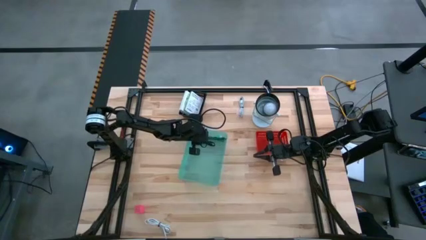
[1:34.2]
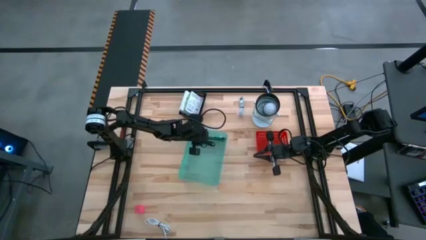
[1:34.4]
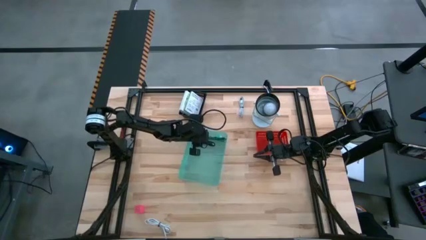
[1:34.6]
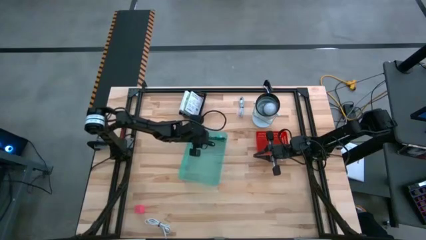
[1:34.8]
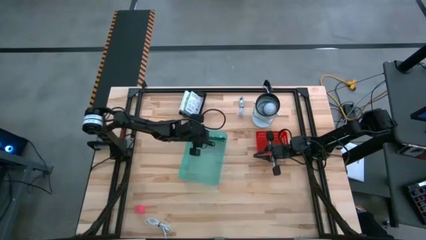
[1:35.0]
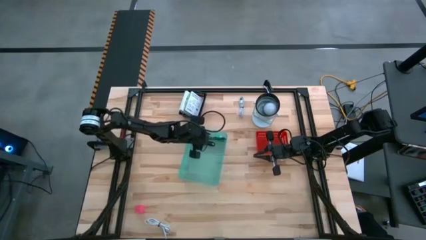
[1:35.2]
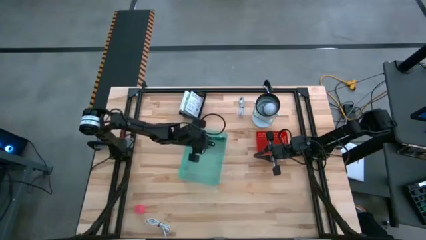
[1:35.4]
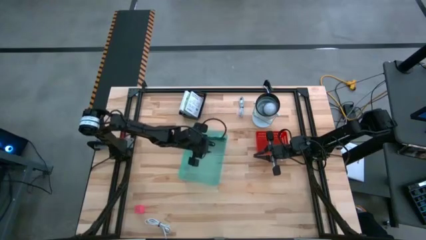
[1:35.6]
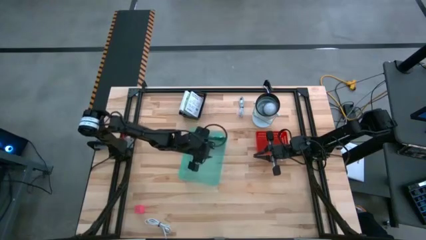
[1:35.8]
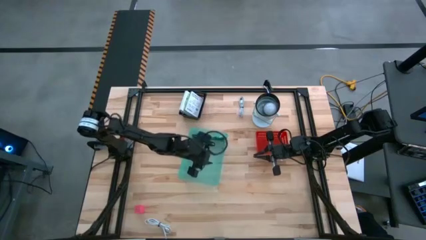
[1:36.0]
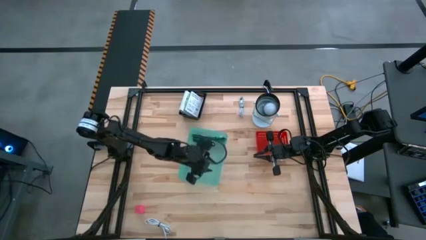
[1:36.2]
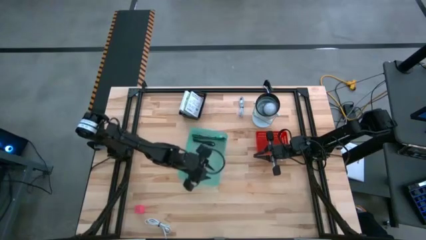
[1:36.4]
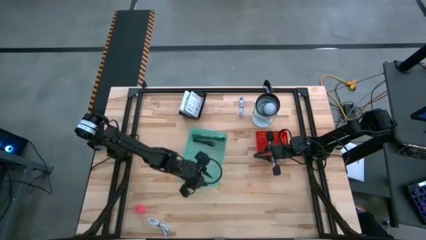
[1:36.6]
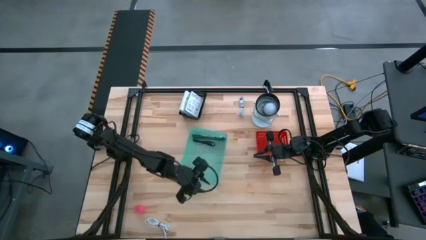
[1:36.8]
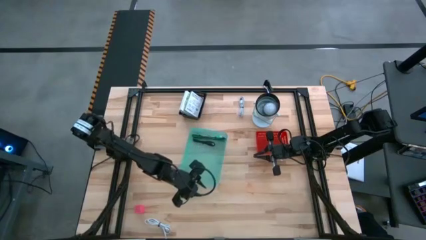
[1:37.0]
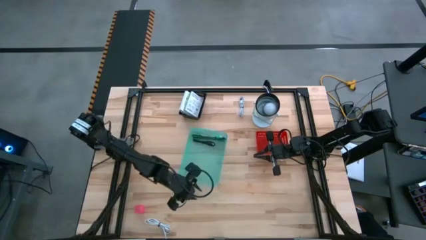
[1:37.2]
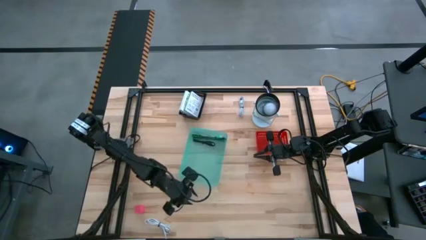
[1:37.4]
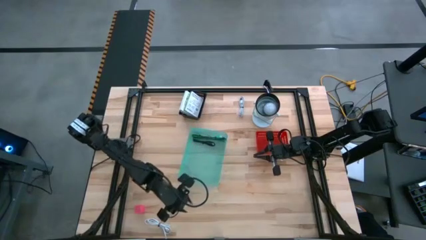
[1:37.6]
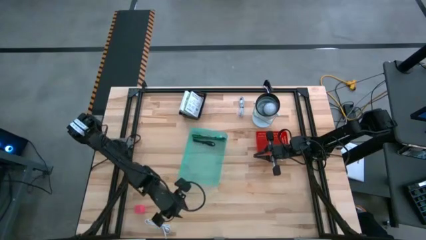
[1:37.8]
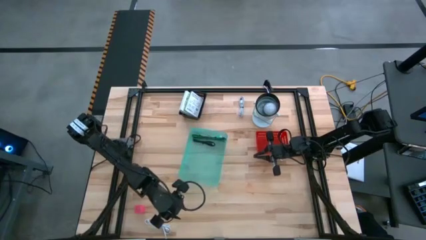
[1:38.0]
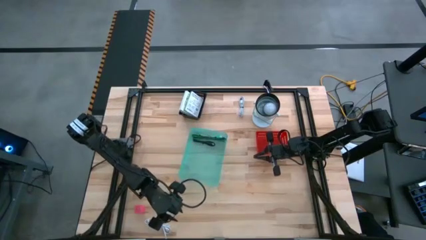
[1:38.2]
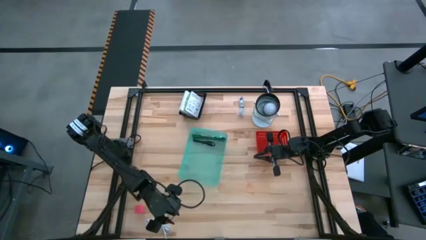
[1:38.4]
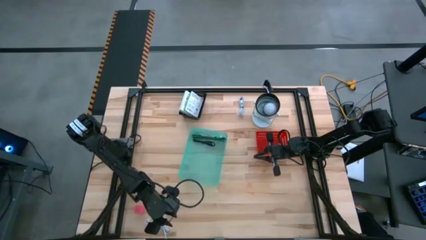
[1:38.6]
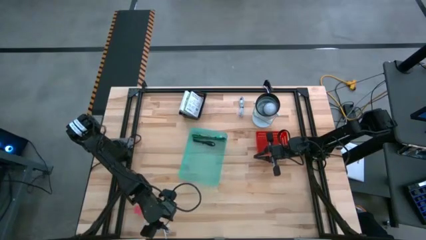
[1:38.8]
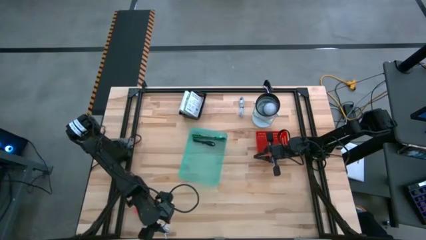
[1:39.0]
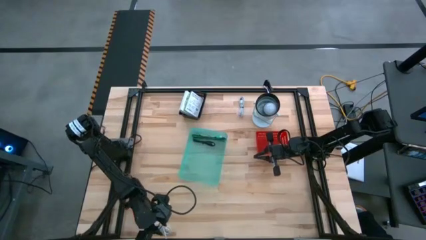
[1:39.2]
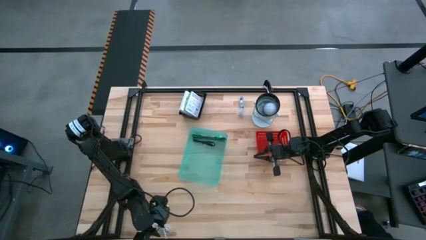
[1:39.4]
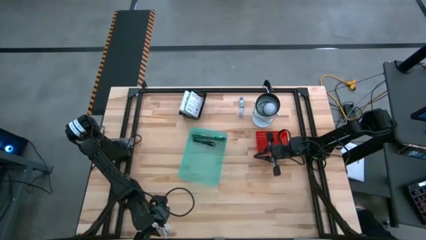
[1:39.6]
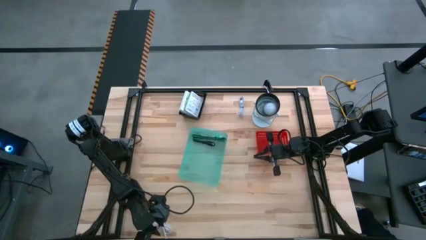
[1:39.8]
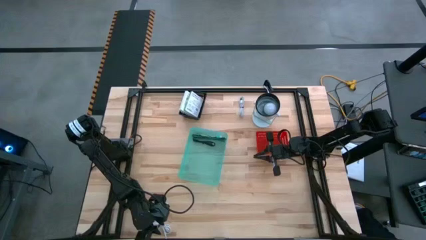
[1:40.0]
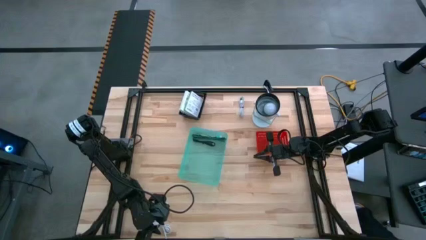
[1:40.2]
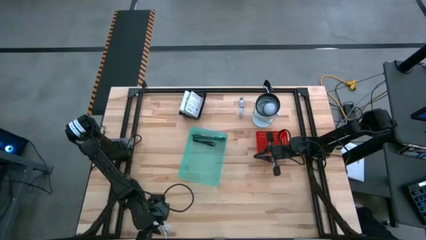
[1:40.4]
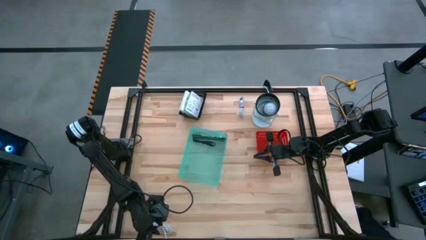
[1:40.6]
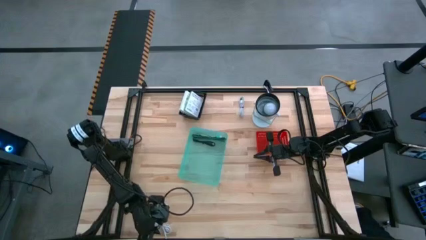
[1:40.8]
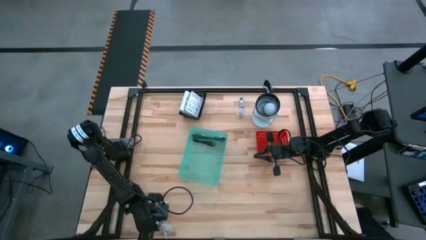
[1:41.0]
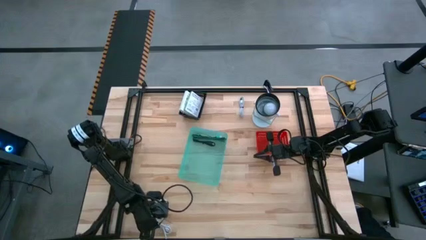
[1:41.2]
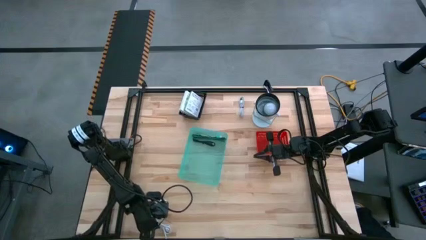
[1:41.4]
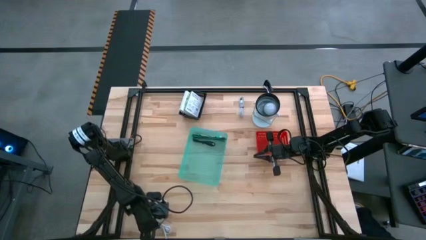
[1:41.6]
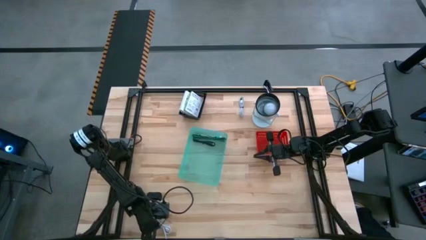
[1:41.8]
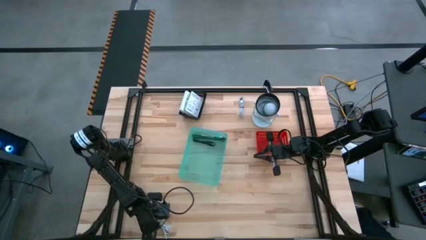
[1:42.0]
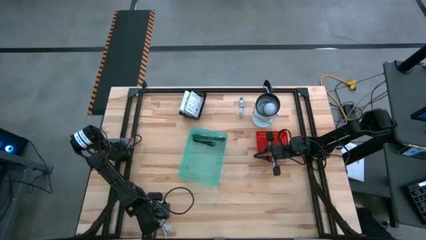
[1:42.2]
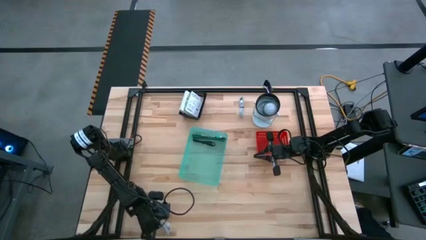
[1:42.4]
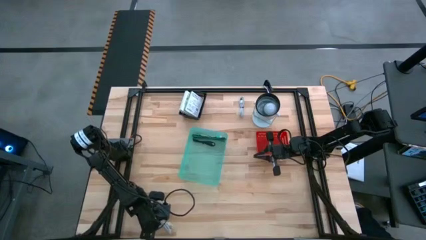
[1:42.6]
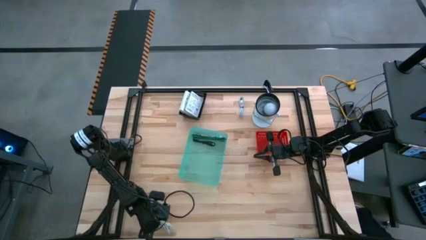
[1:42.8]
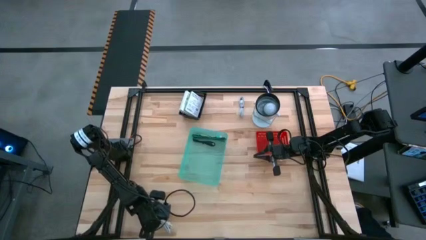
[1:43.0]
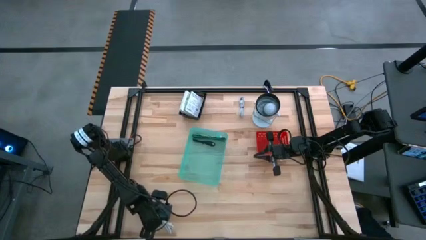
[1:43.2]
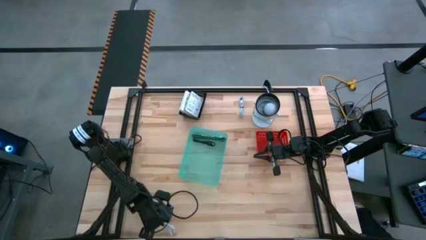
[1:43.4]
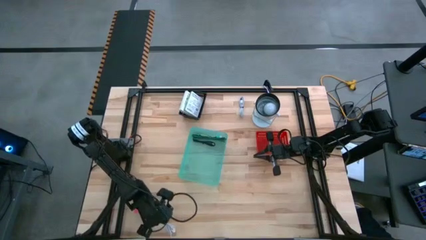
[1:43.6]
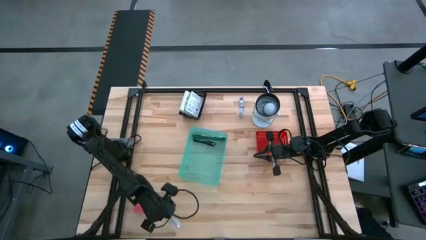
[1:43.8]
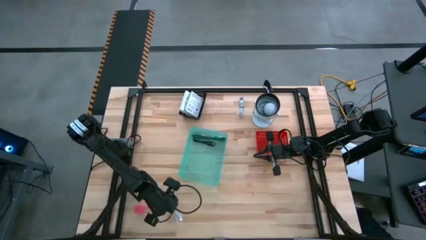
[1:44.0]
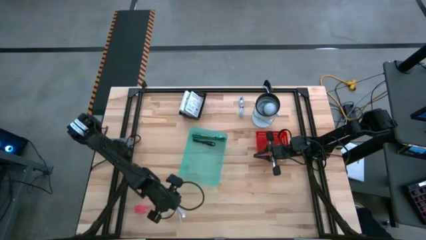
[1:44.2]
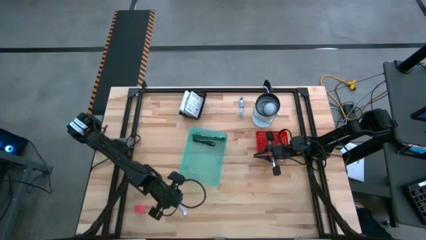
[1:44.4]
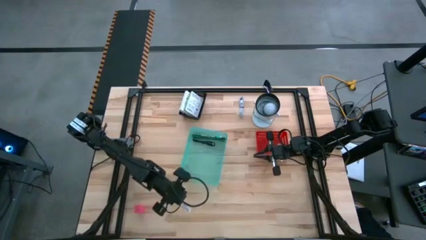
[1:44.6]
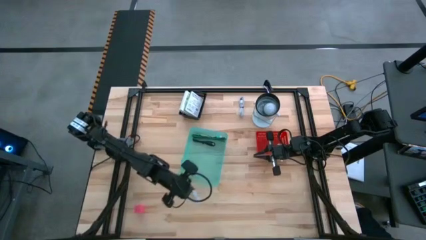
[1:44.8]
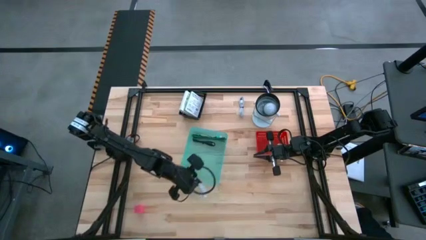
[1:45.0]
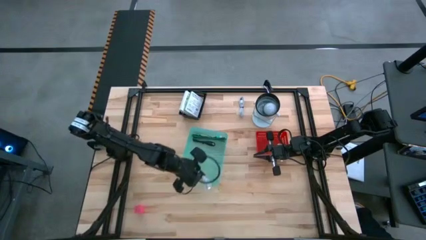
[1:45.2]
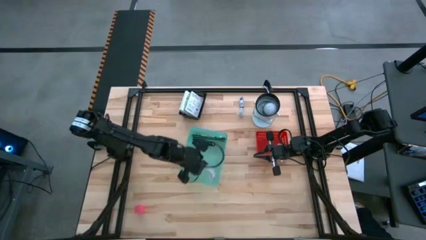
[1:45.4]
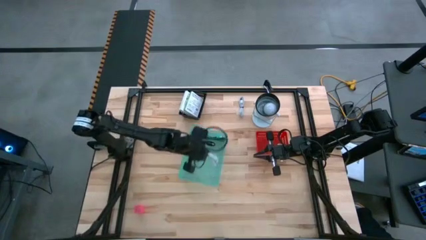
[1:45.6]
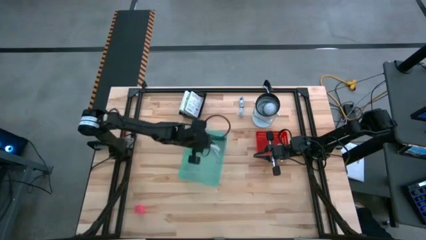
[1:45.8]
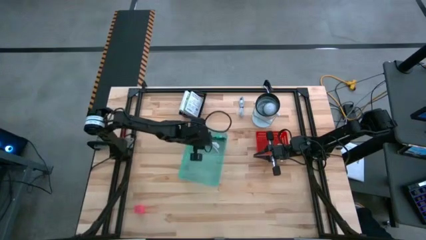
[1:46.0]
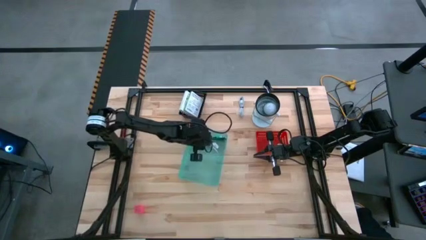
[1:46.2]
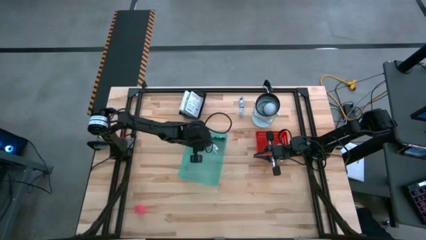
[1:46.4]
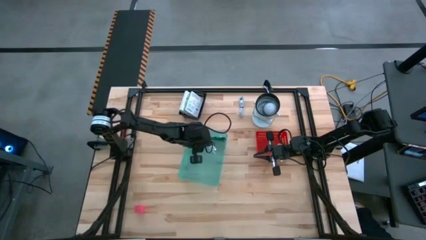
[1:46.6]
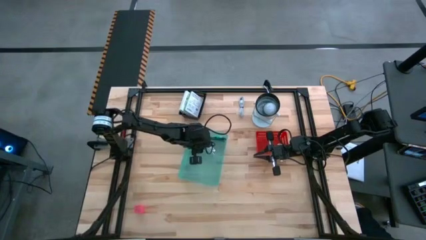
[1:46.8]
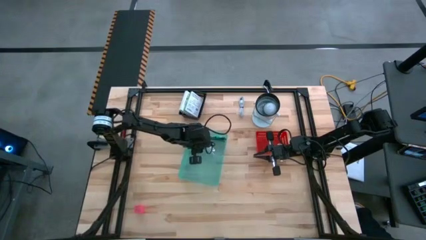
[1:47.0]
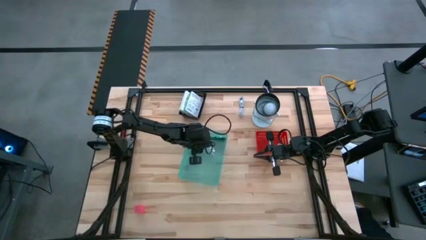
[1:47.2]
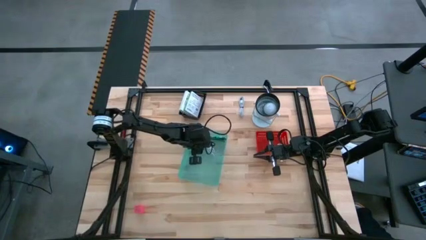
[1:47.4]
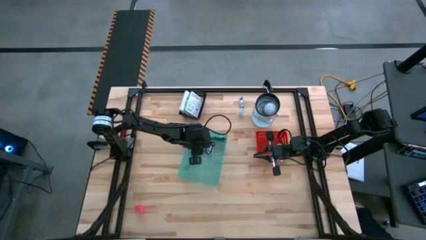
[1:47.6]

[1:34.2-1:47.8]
Task: Pick and place items into bin
Put the bottom left white charger cable into the green bin
